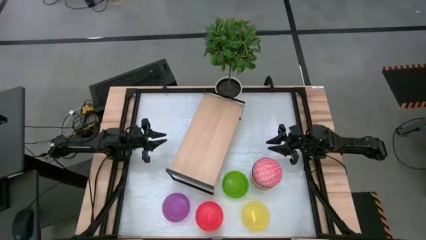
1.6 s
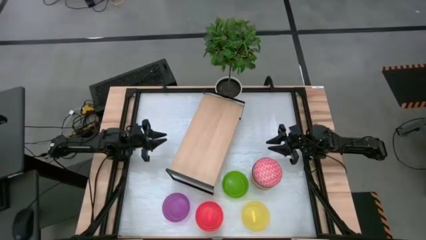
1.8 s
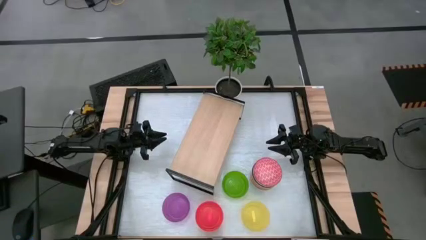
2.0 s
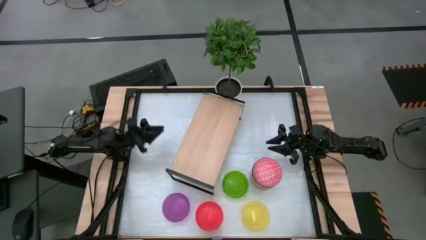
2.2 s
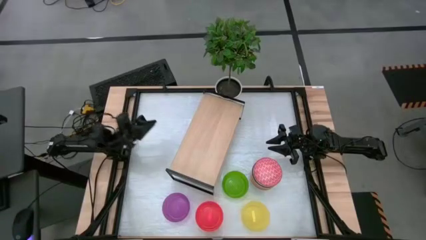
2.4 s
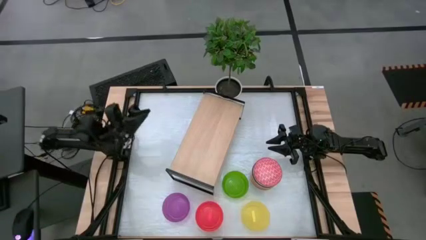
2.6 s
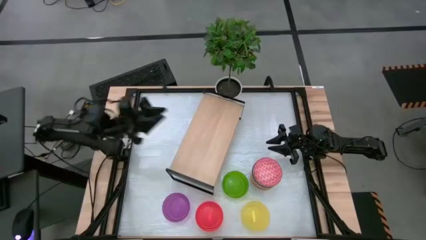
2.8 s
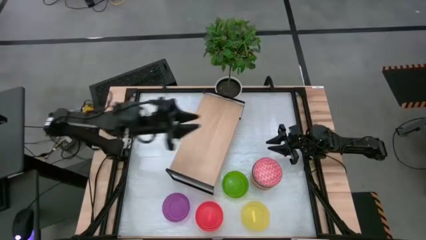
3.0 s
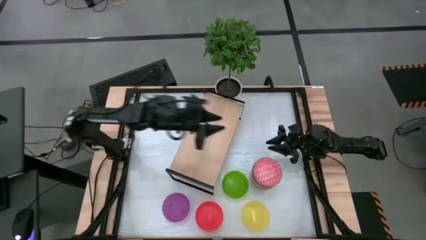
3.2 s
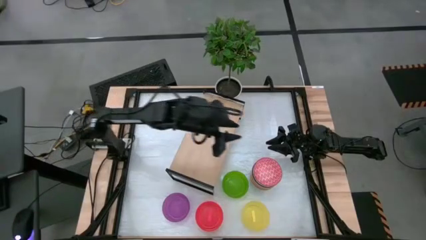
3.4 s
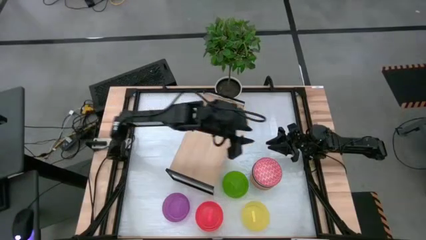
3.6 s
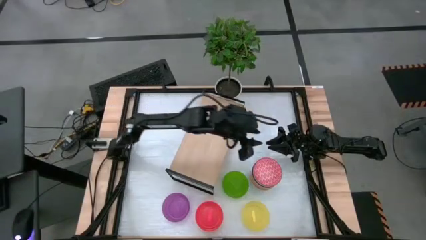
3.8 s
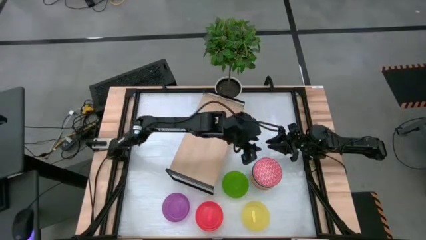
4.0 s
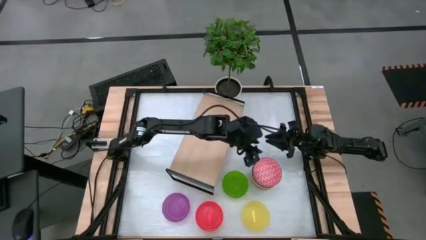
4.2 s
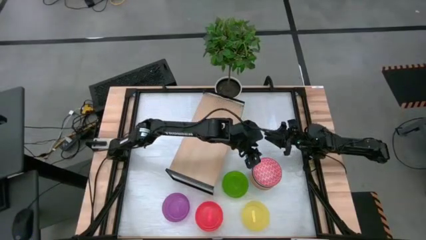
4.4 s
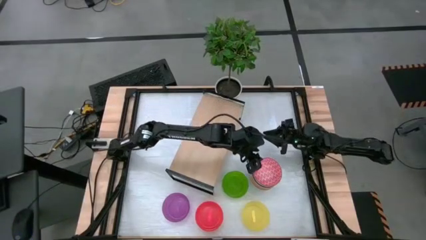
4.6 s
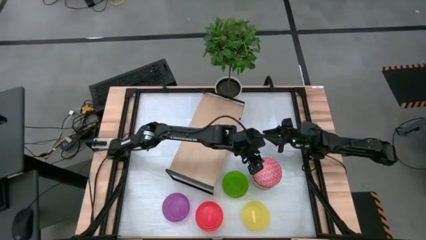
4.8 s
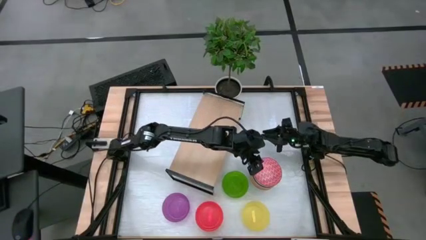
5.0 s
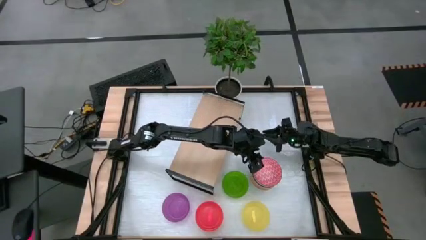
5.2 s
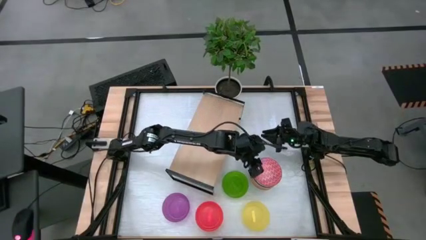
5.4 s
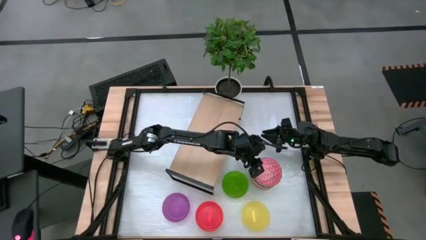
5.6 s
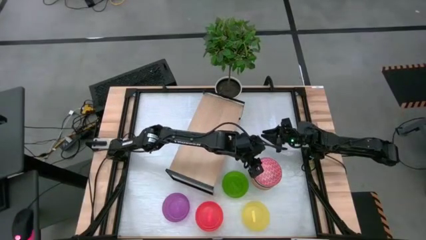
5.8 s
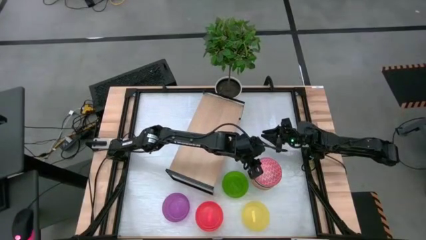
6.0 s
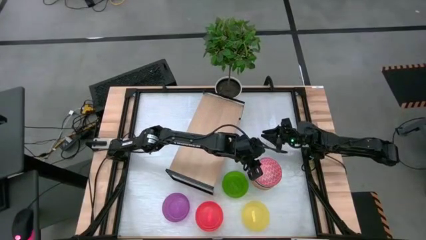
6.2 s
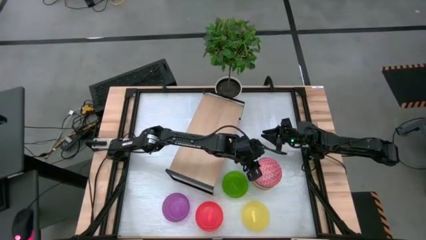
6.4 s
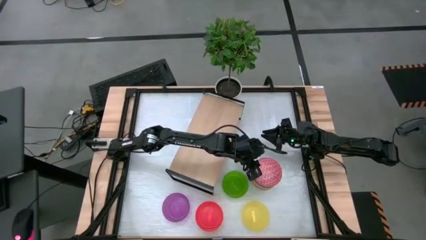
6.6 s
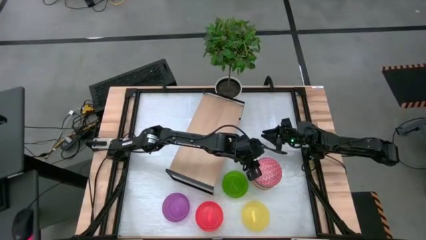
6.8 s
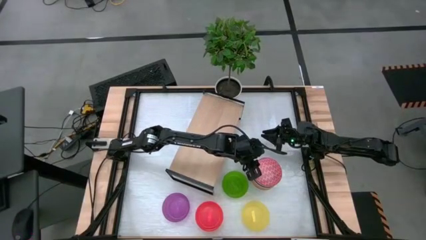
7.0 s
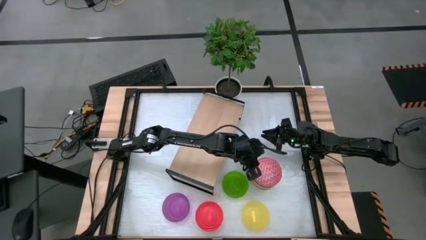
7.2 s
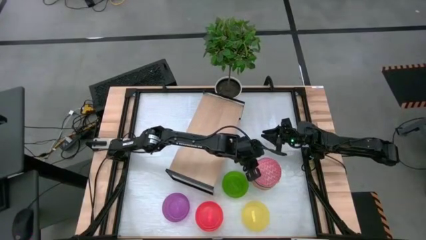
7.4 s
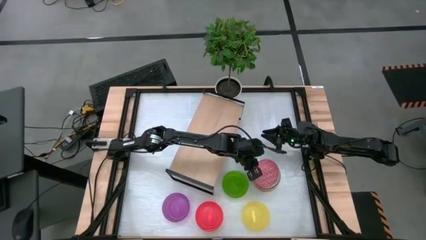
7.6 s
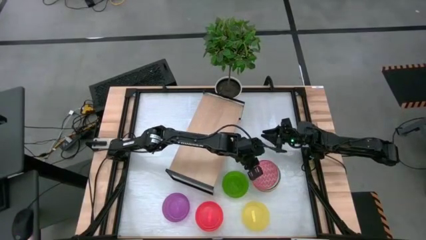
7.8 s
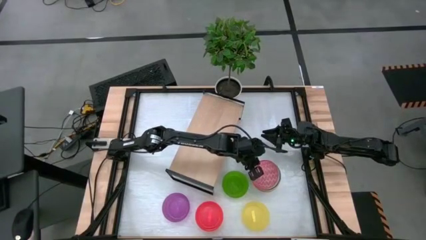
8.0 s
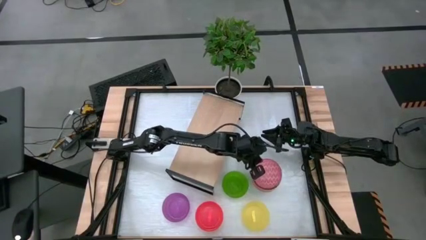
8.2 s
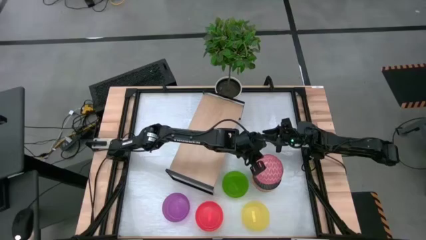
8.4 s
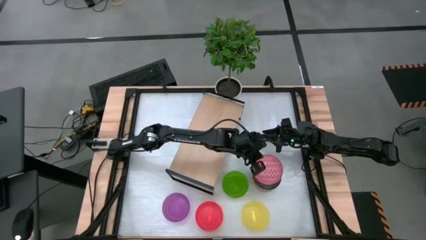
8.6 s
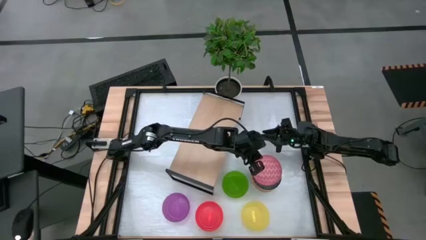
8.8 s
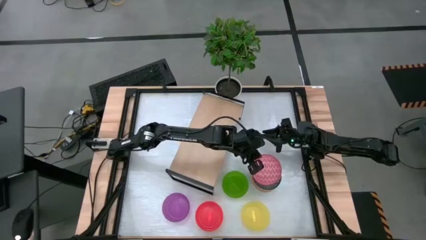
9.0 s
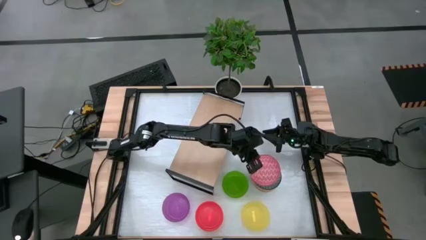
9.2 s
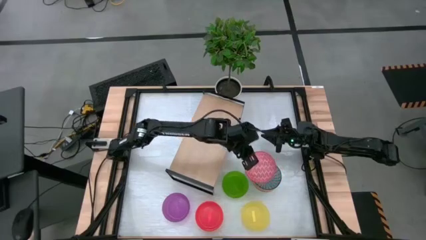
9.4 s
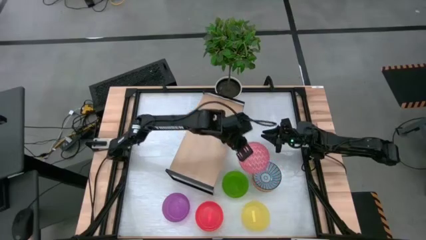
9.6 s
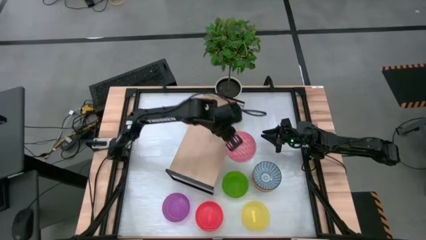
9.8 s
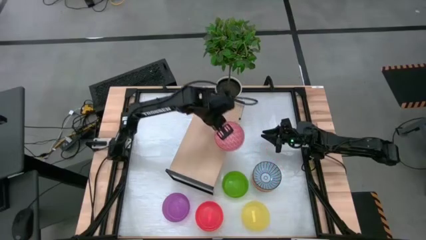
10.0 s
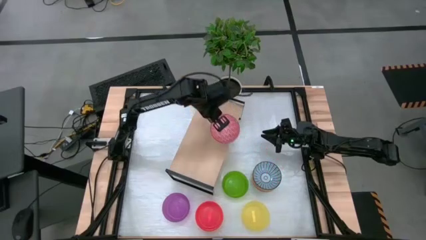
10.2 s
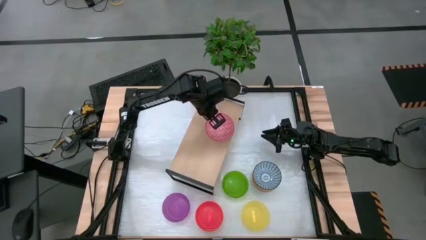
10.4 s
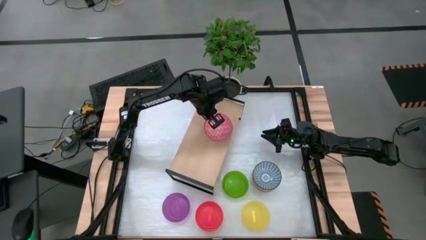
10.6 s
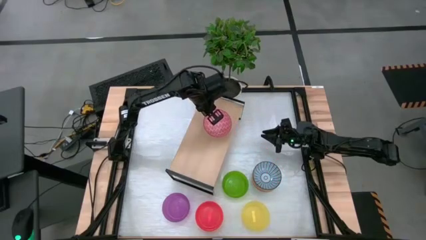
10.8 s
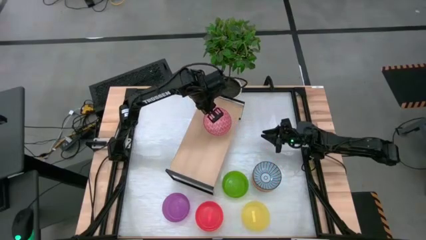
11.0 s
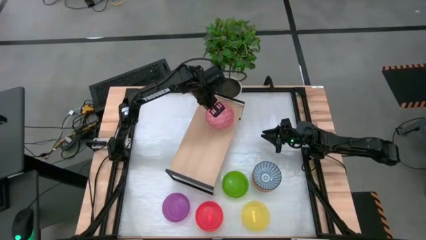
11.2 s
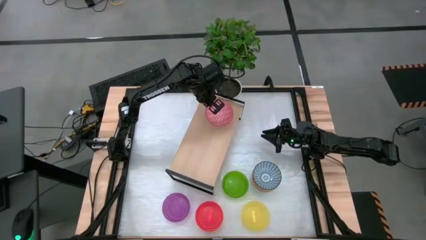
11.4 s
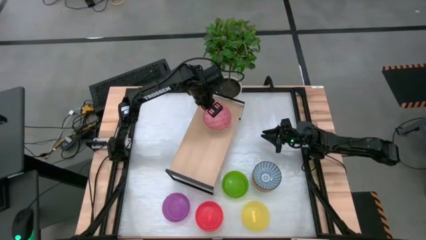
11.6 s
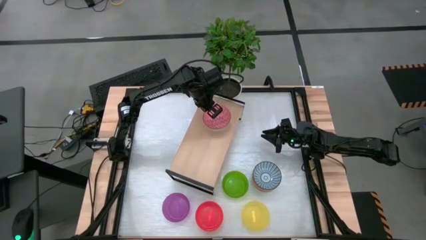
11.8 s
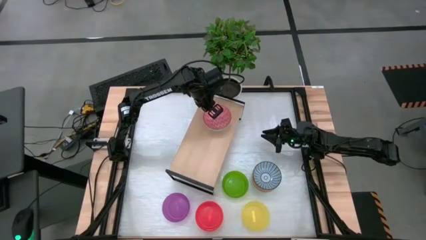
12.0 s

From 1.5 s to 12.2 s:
Task: Place and stack bowls onto a shelf
Put the red patterned bowl on the shelf

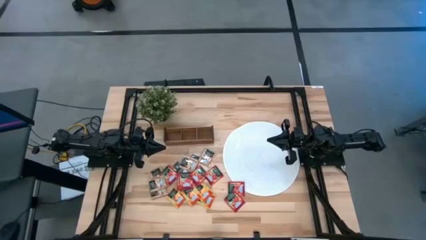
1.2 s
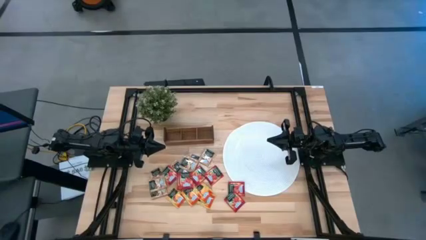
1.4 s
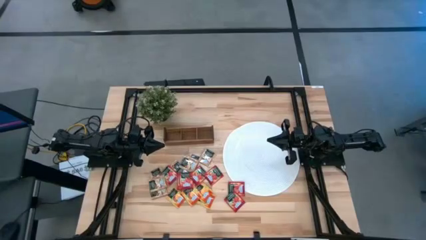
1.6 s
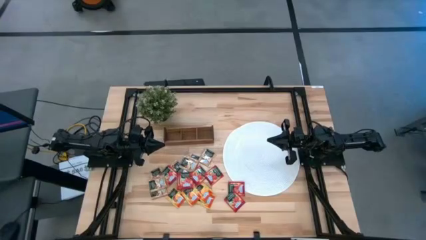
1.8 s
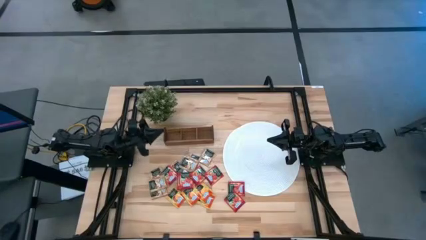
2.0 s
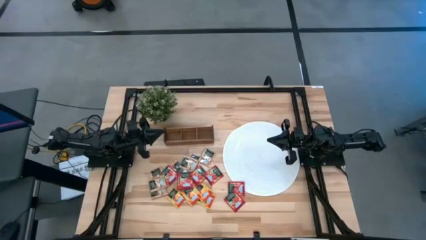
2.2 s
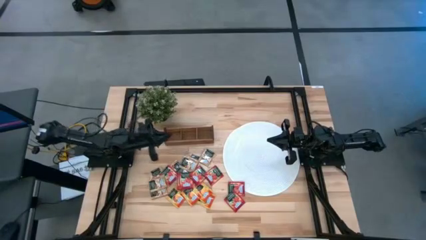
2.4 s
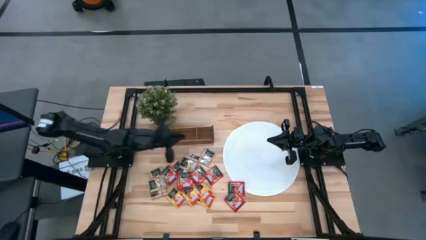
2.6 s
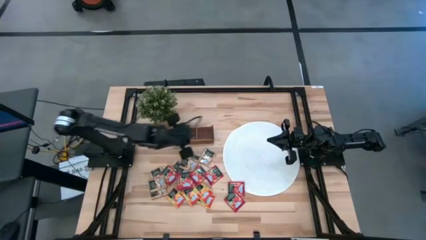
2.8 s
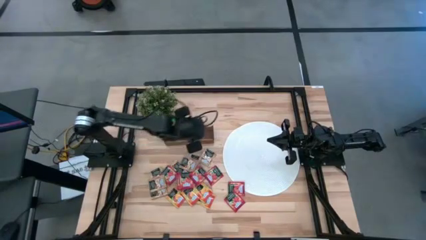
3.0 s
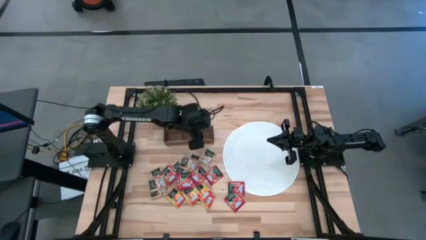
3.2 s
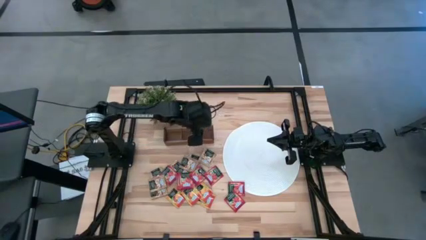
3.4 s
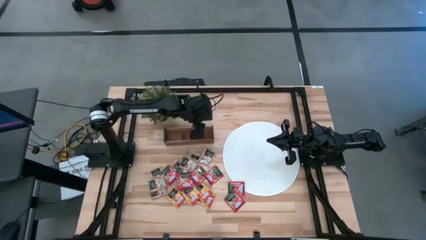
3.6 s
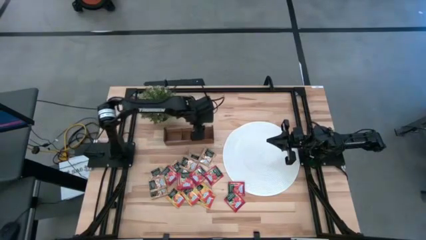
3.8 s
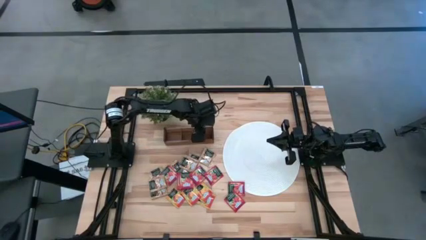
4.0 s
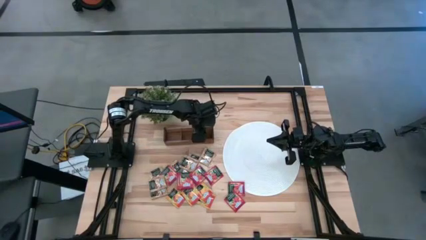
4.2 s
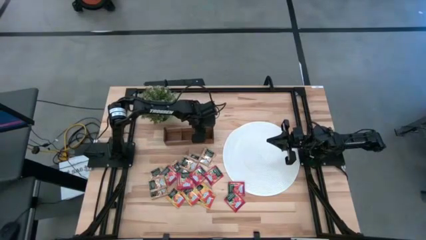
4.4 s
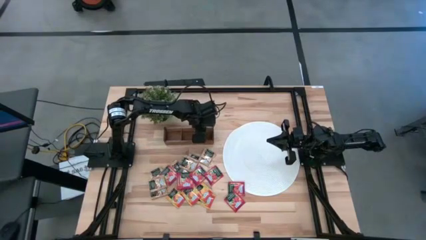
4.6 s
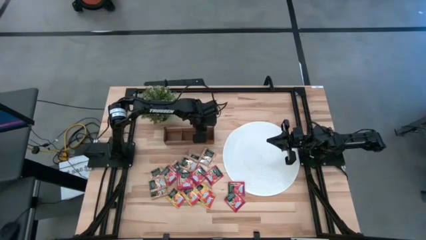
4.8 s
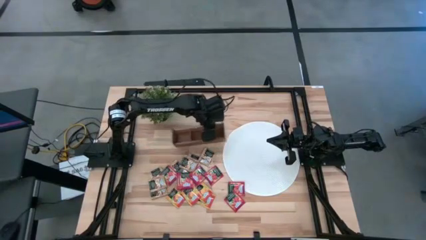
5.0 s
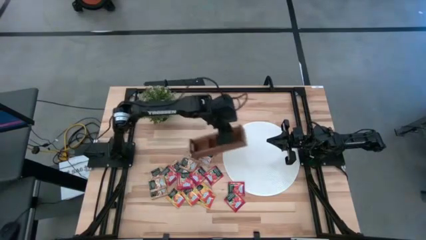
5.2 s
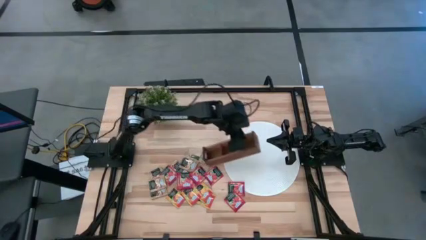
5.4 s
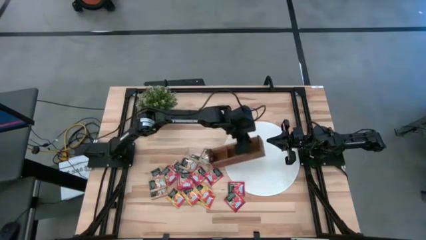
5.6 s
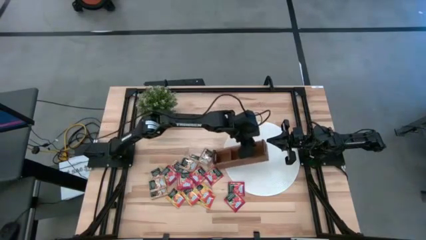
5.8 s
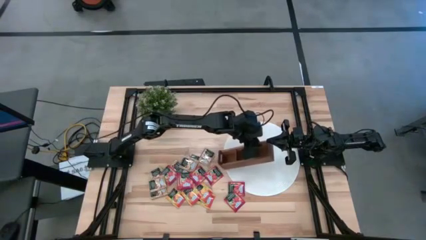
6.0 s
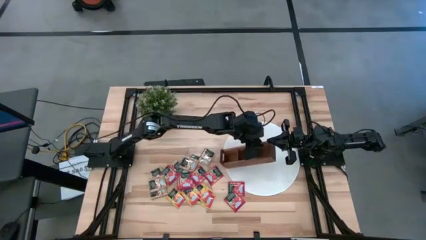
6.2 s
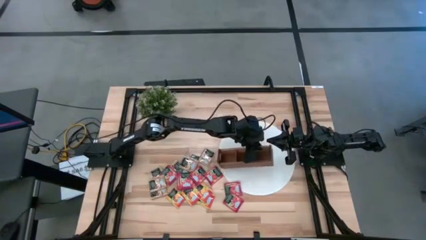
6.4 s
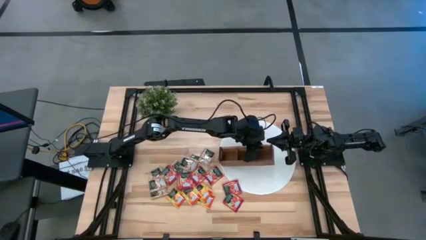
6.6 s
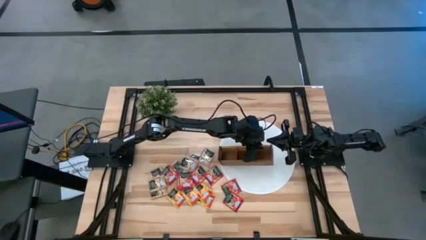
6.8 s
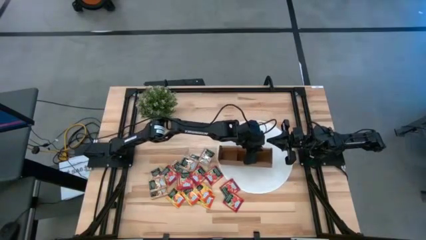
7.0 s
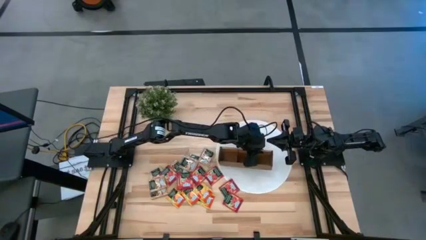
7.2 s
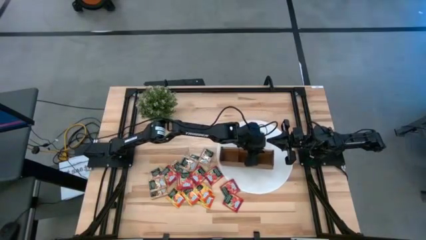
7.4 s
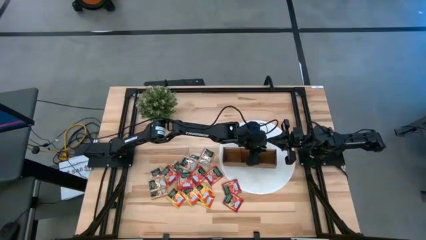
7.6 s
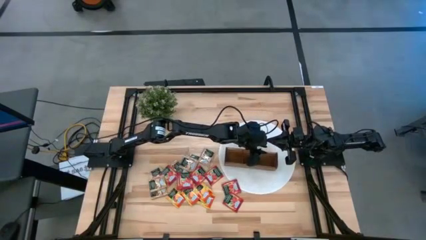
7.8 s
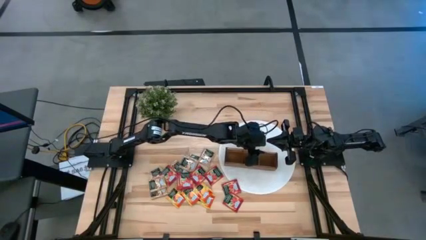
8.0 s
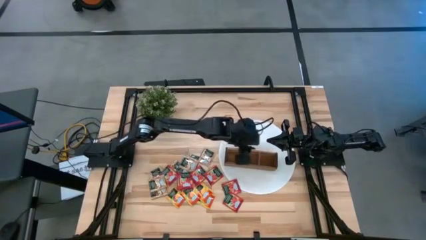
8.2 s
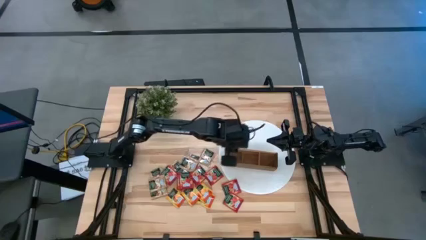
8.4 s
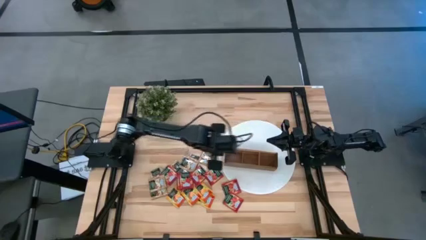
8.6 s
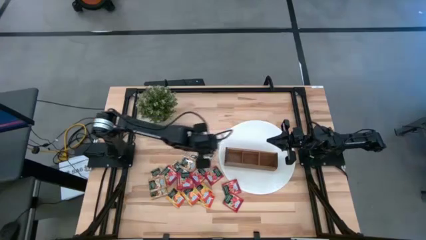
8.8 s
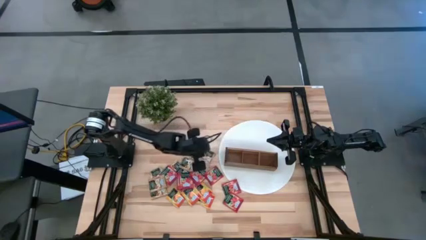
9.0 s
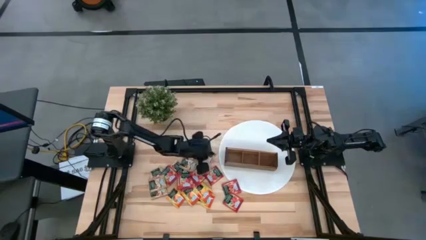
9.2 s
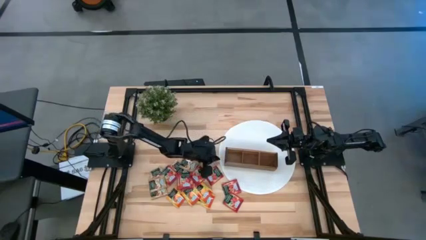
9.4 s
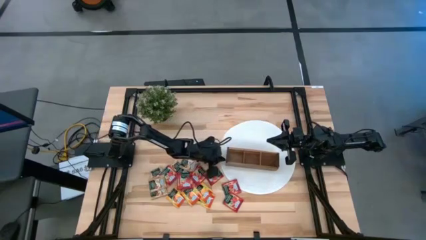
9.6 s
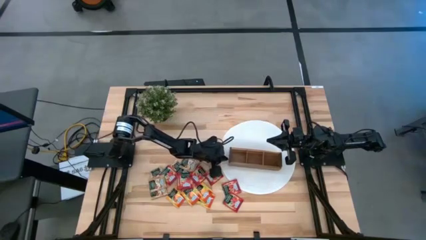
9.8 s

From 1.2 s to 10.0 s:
Task: Pick & Place Tea
Prepare the wooden organizer on the white mat
